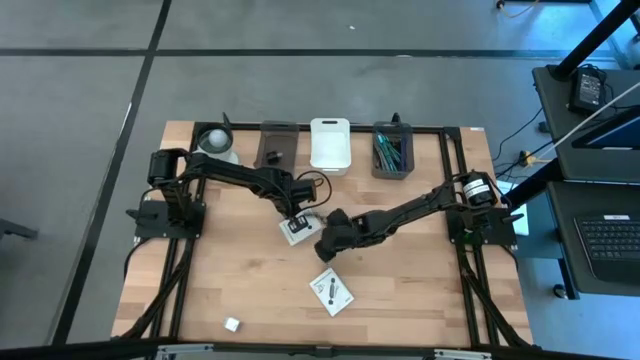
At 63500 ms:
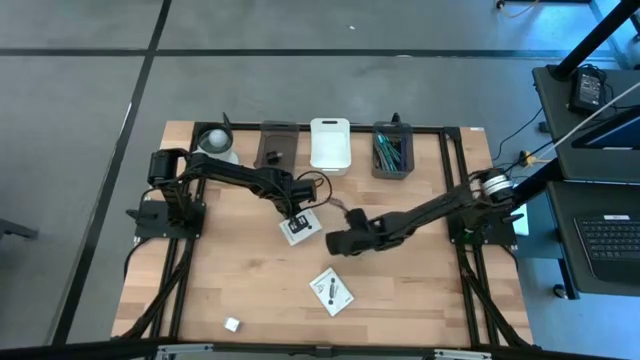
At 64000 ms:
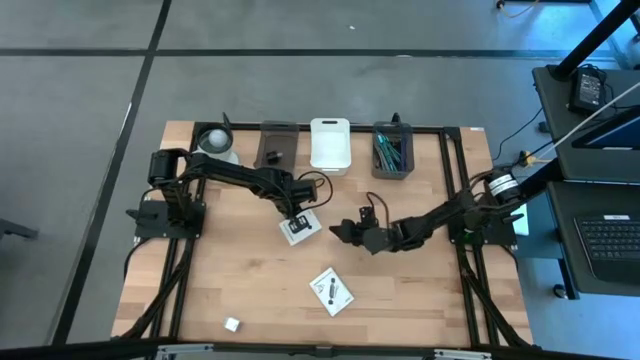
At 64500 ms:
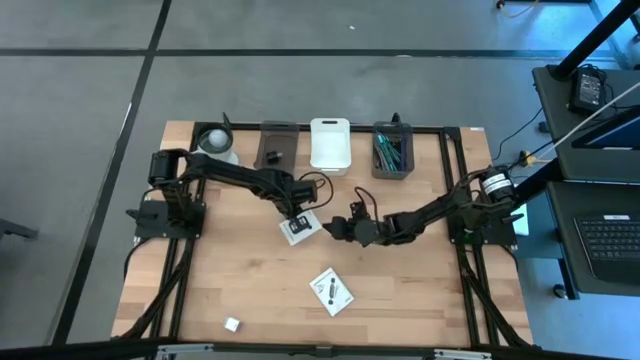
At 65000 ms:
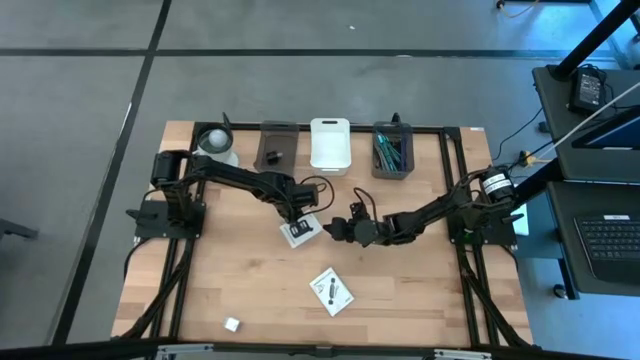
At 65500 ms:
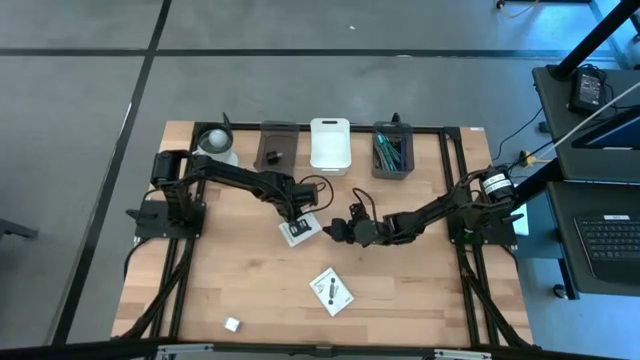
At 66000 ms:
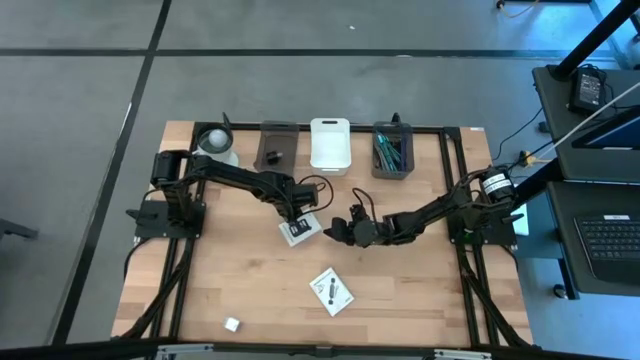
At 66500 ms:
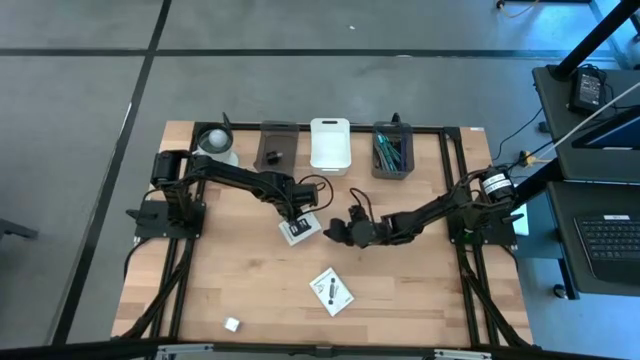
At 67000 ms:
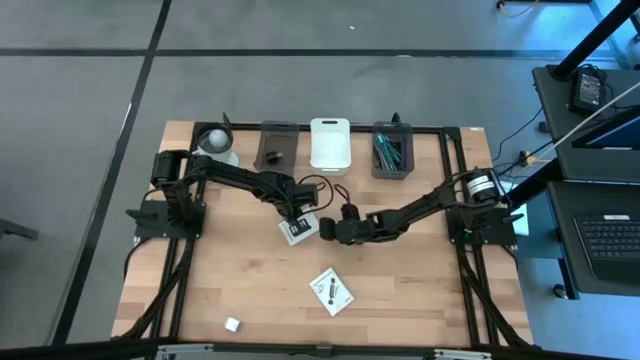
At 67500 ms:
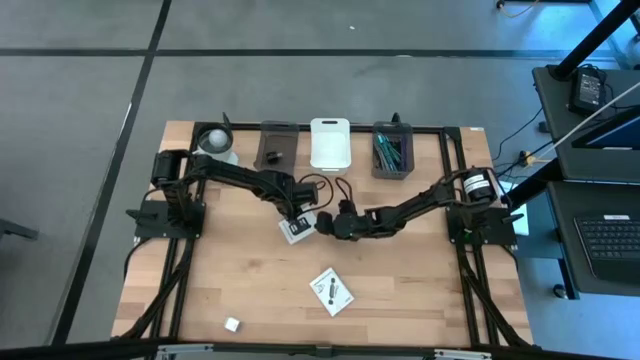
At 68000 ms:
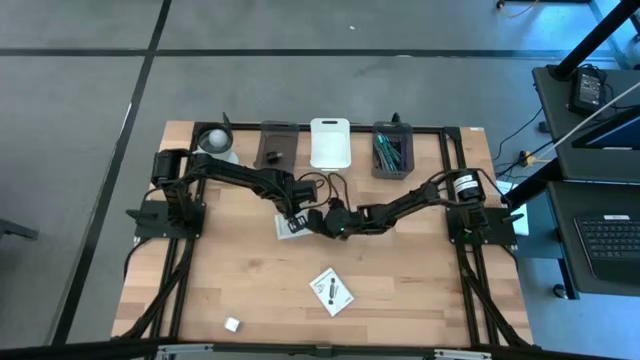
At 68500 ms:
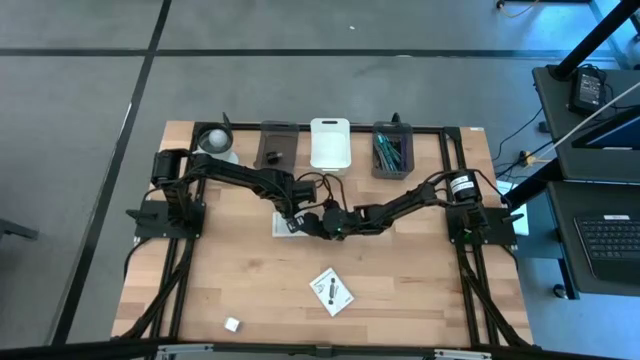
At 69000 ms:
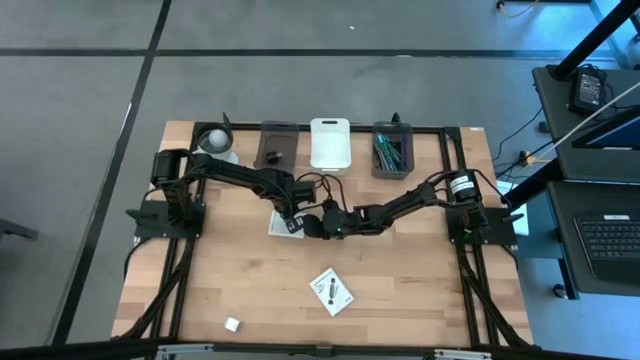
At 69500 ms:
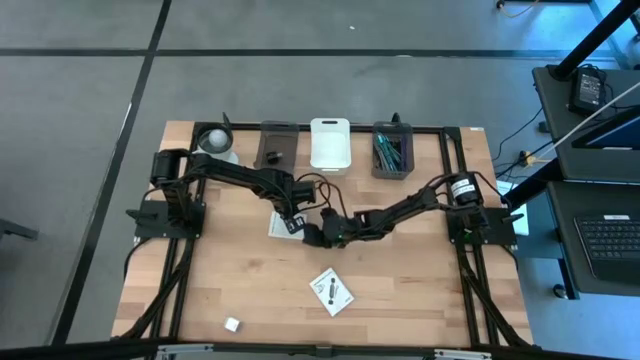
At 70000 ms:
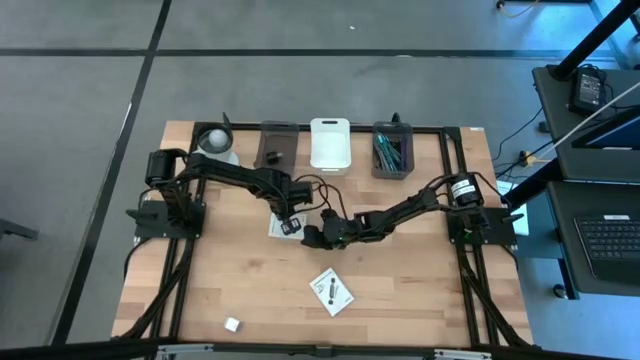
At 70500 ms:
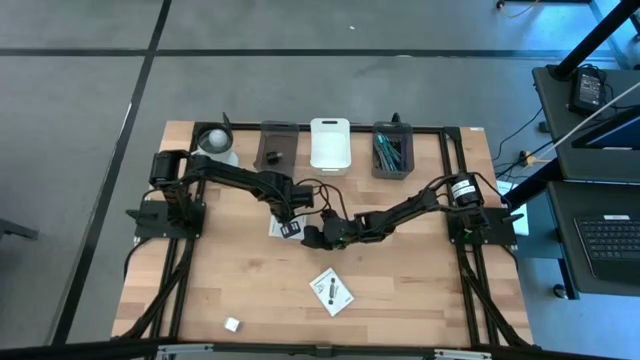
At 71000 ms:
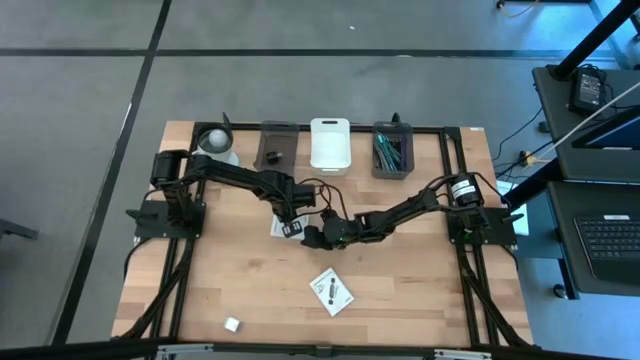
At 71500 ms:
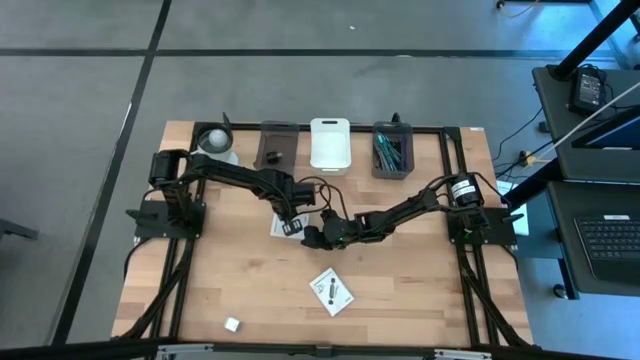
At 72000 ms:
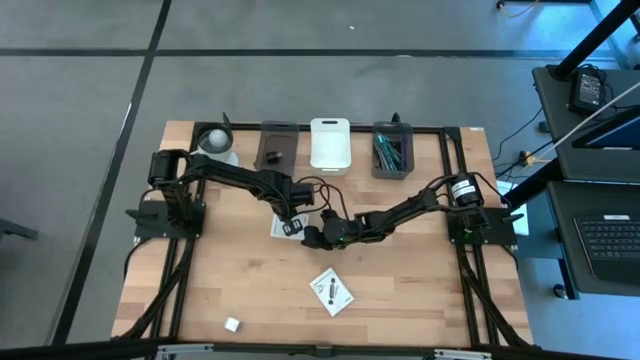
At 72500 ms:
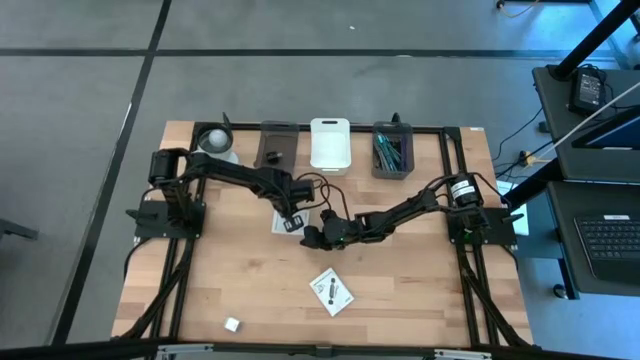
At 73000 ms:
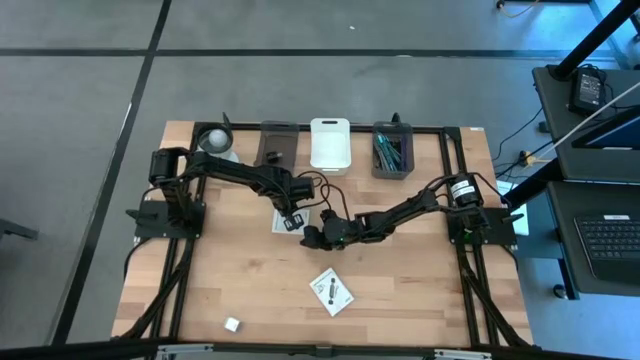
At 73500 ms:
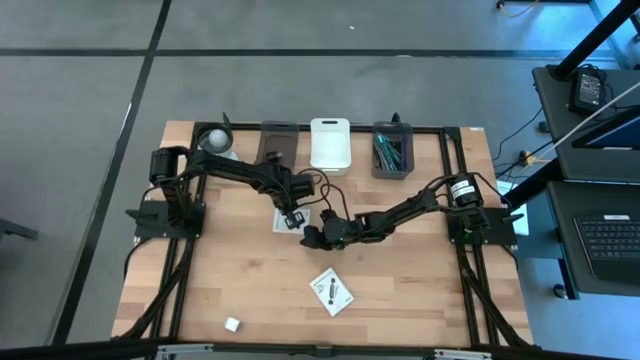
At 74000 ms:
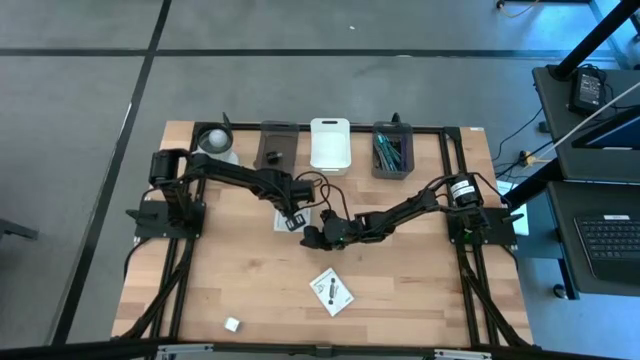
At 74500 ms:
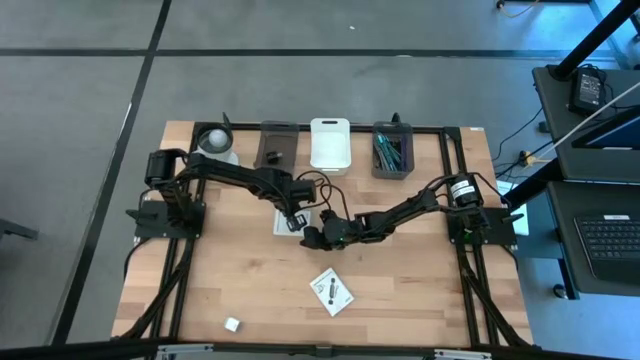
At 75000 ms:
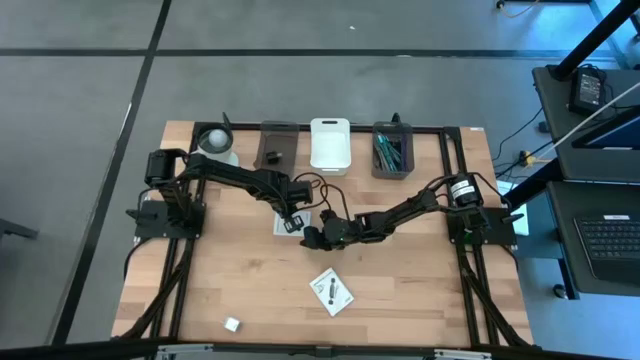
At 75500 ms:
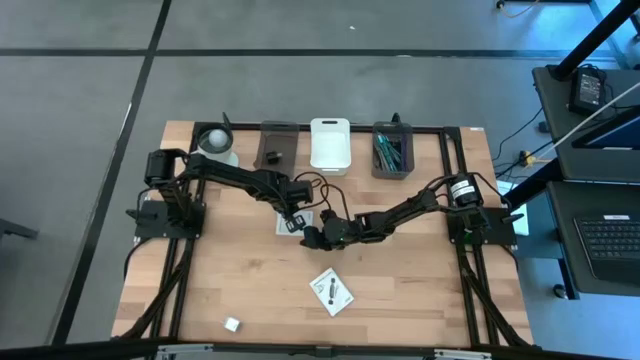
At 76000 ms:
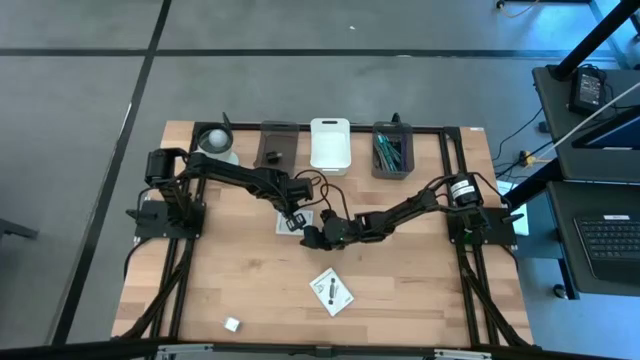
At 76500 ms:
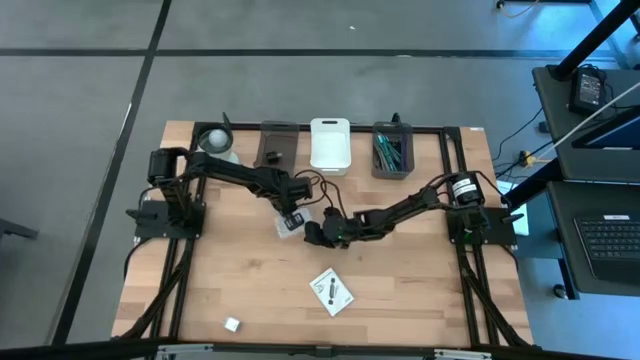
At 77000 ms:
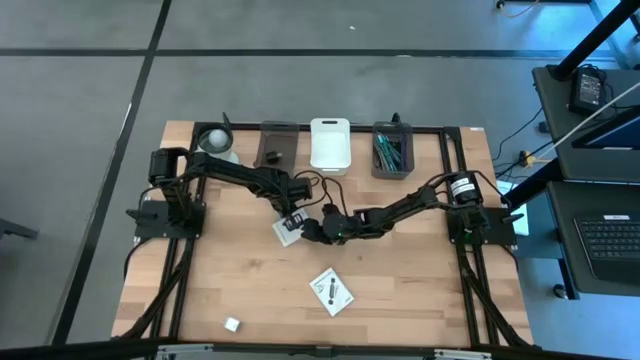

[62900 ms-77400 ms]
Task: Pick and place items into bin
Put the left white card reader box into the white bin

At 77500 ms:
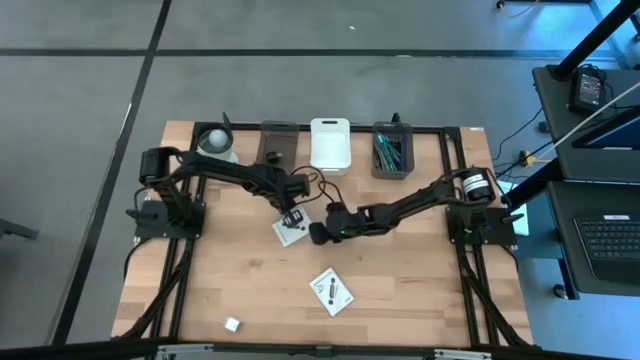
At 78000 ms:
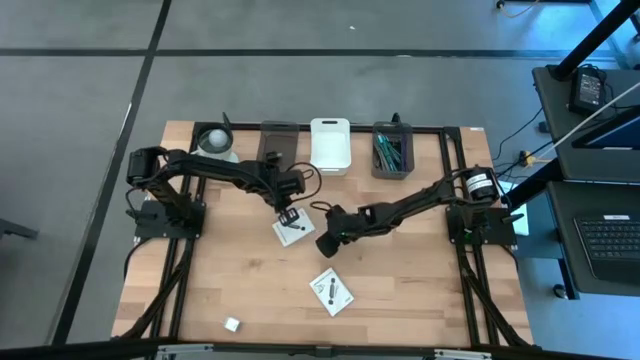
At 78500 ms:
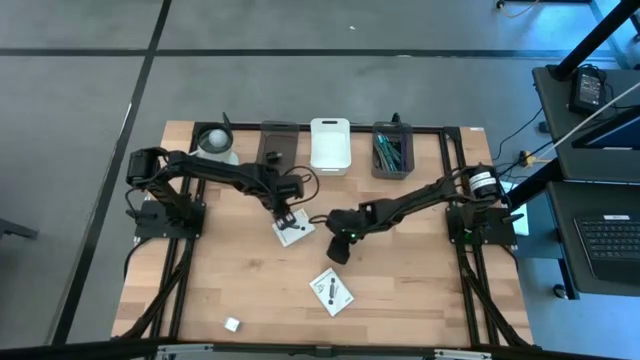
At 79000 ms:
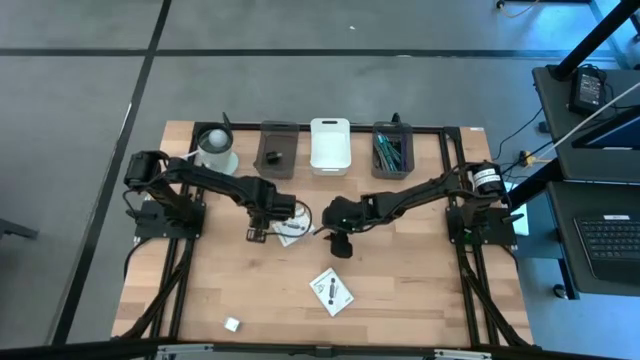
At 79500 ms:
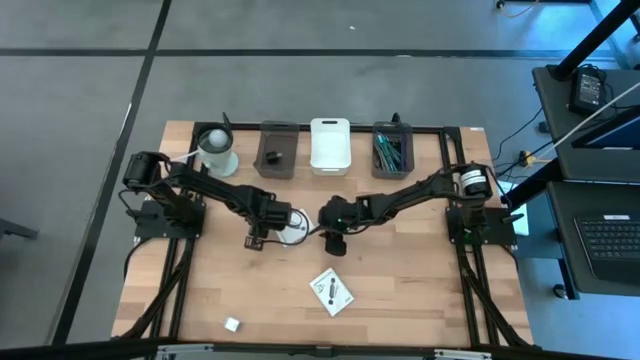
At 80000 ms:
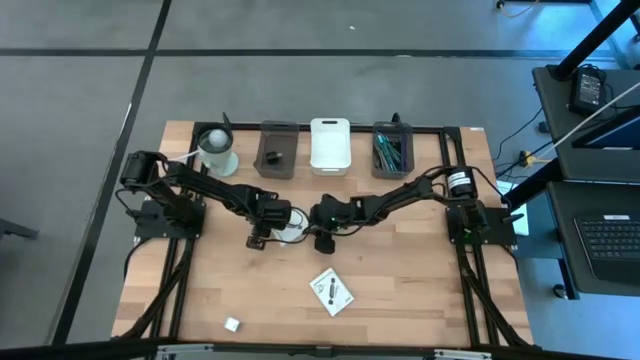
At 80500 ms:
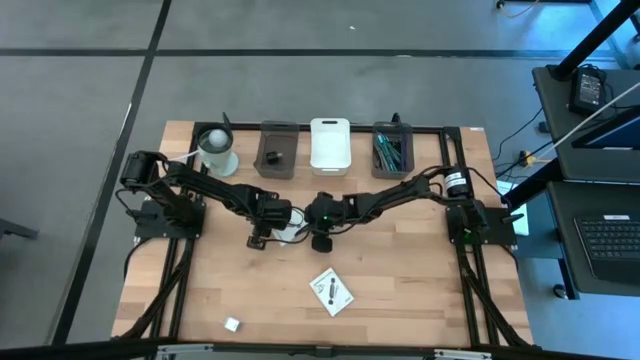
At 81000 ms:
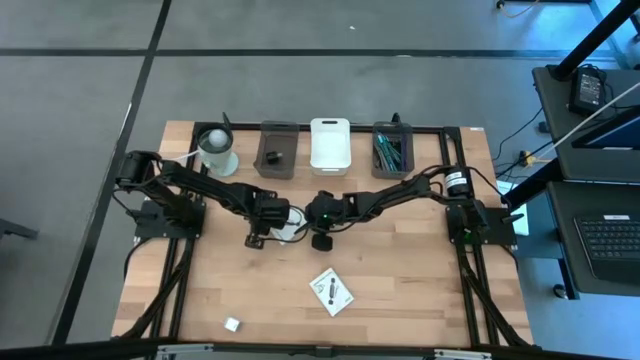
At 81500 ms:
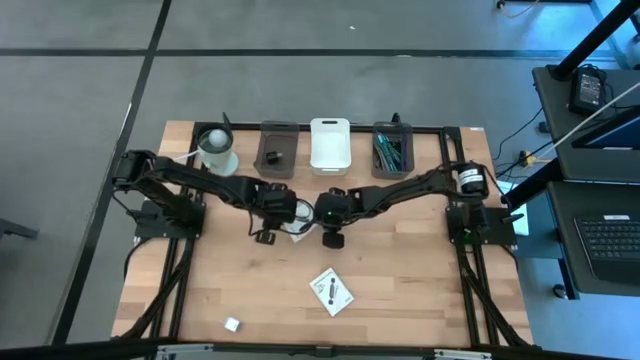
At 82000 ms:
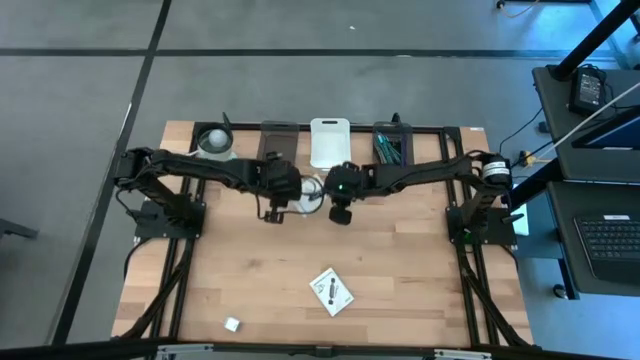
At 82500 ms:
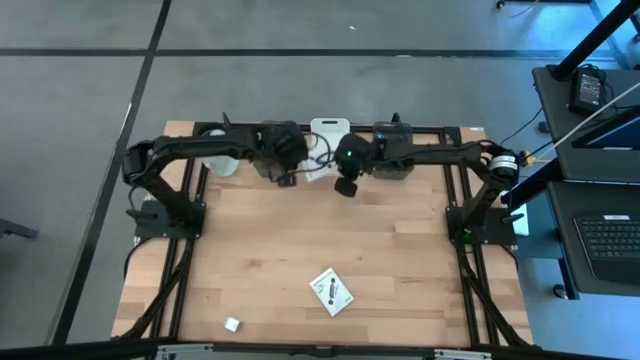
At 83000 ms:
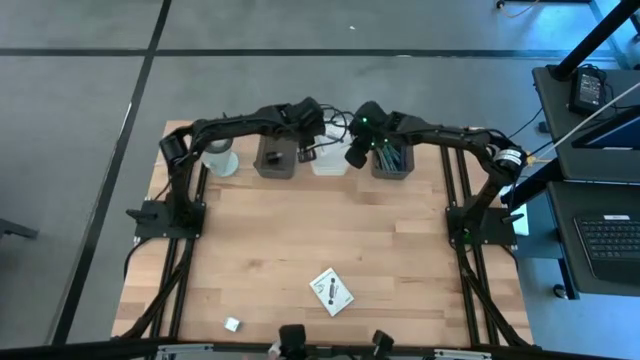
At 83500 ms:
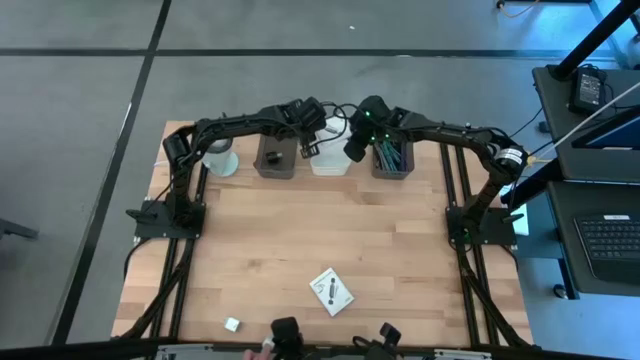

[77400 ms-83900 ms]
Put the top white card reader box into the white bin
